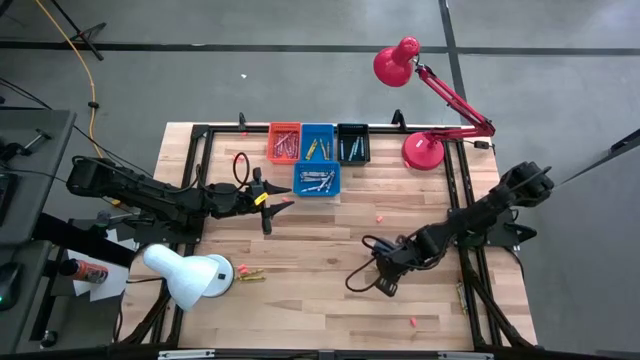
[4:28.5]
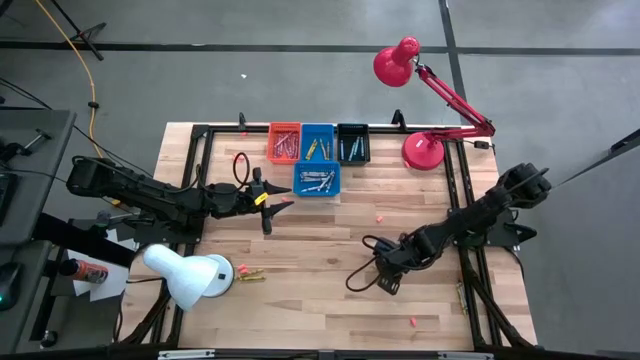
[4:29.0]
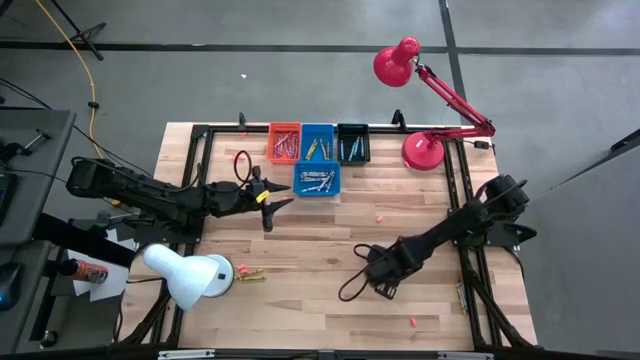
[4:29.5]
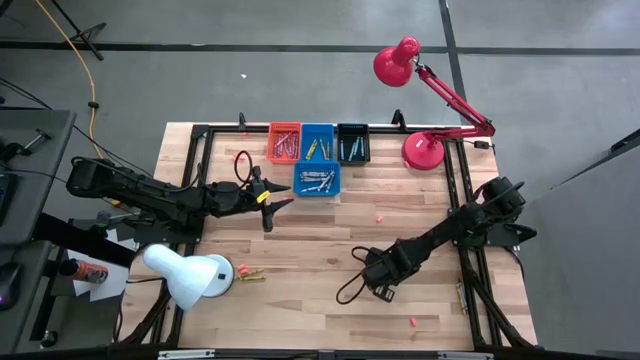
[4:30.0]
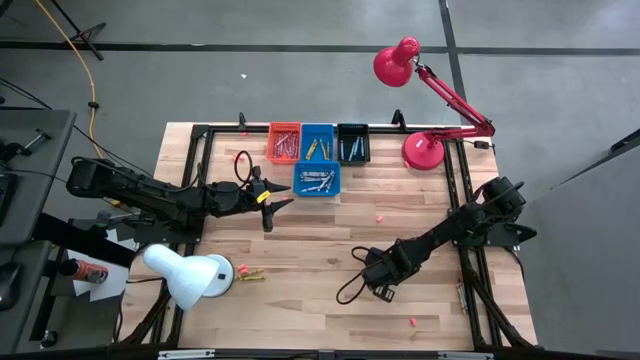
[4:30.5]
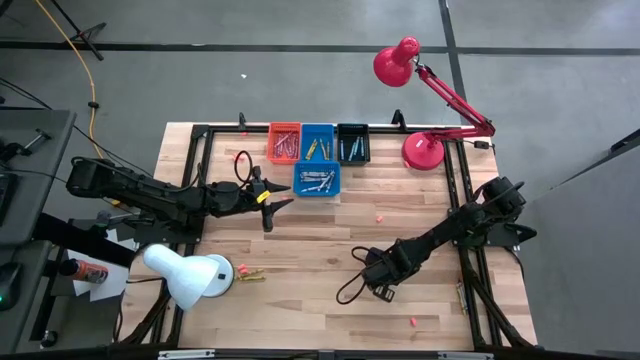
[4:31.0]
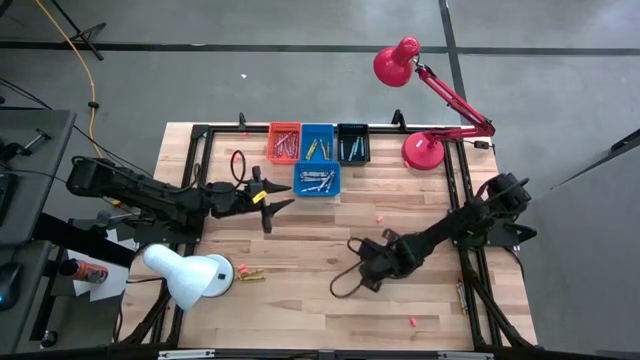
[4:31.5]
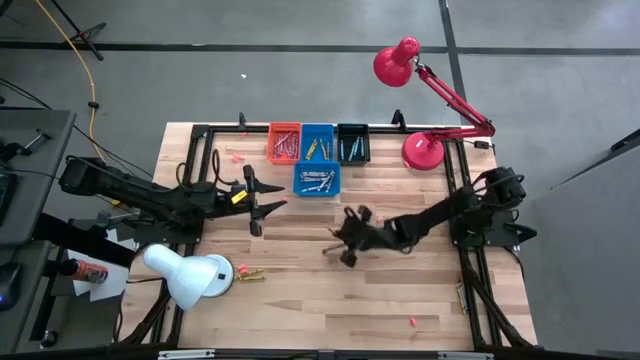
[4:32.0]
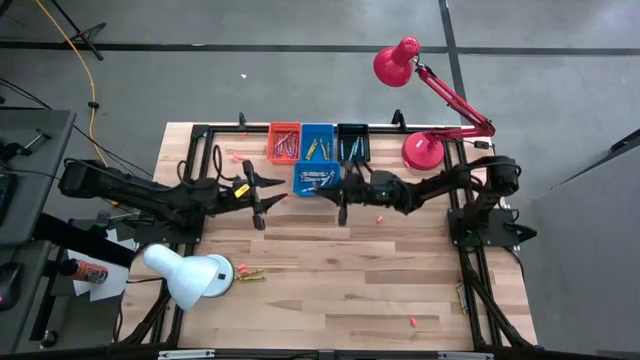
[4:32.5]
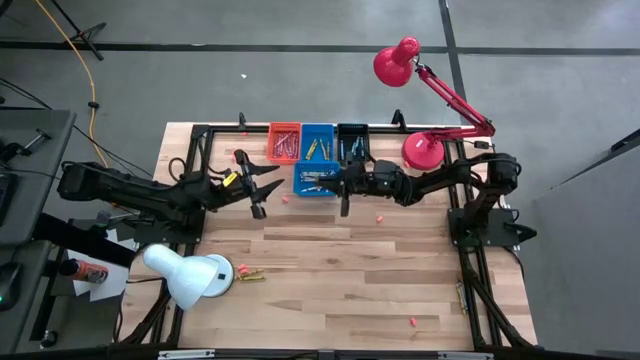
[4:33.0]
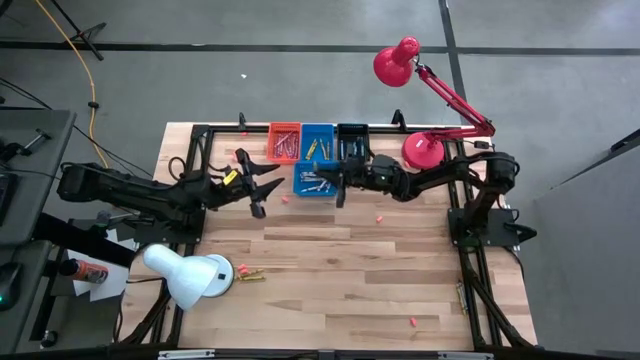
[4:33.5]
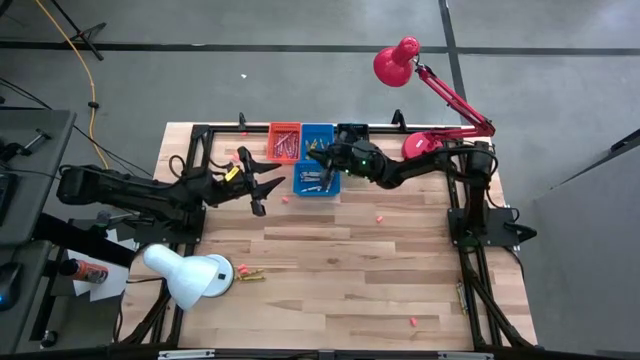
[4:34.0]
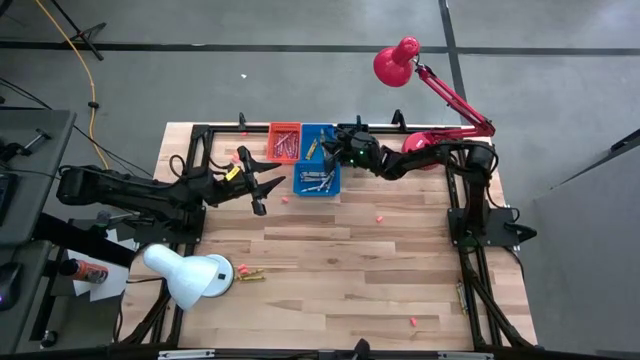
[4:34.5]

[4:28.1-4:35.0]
Task: Sort crayons
Put the yellow crayon into the top blue bin

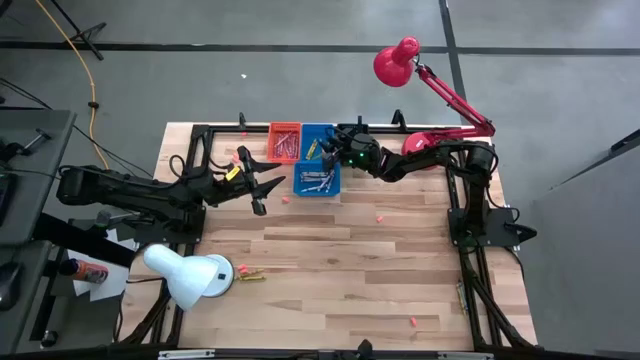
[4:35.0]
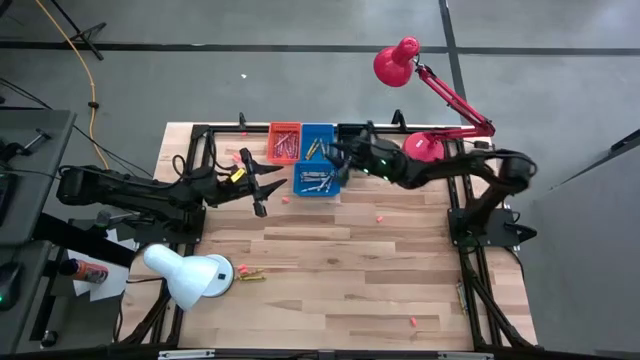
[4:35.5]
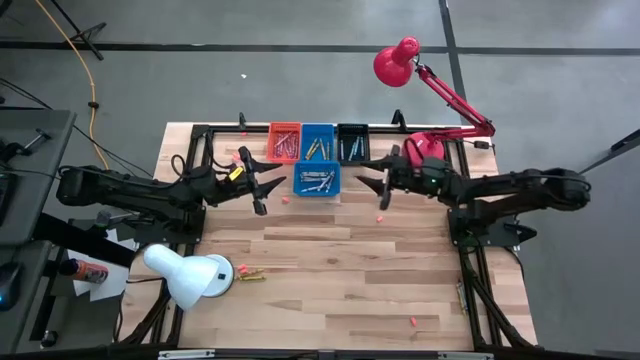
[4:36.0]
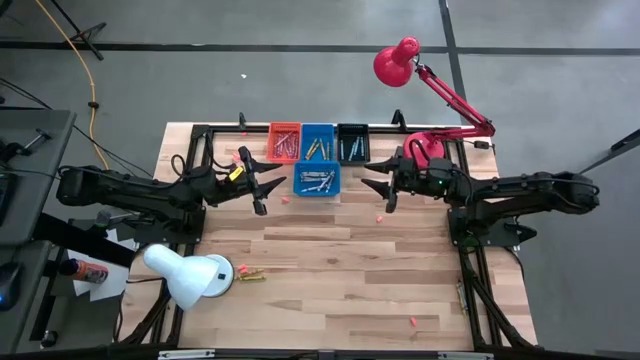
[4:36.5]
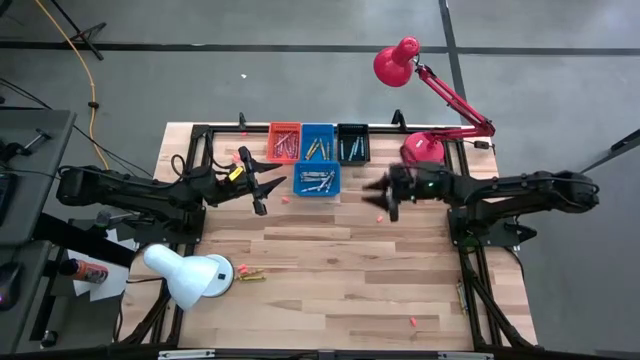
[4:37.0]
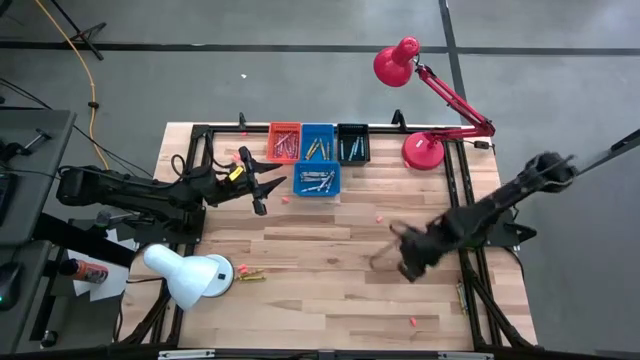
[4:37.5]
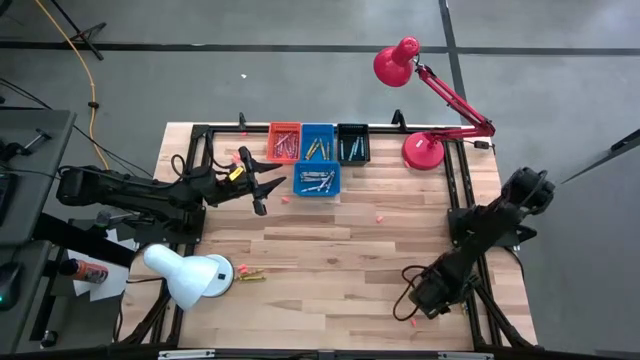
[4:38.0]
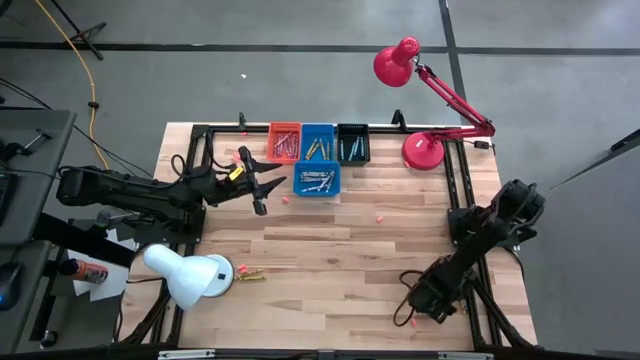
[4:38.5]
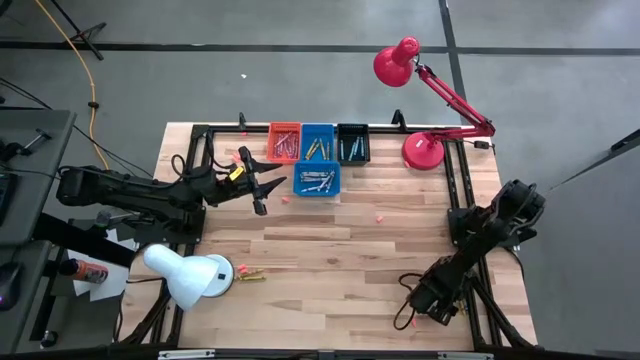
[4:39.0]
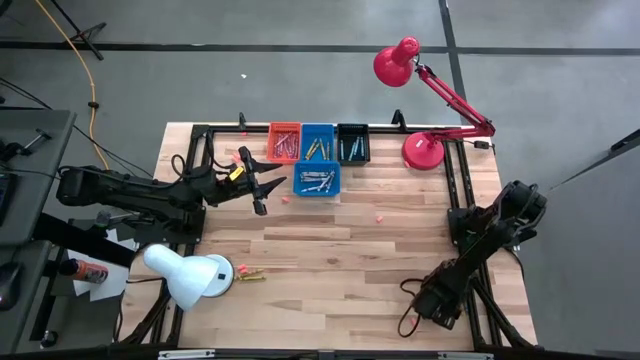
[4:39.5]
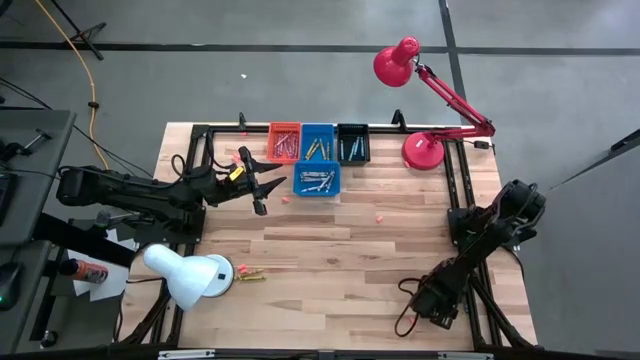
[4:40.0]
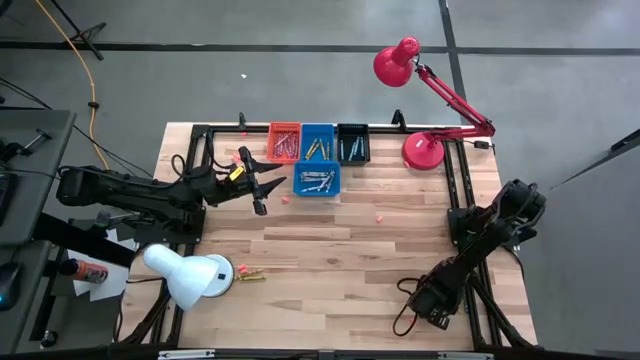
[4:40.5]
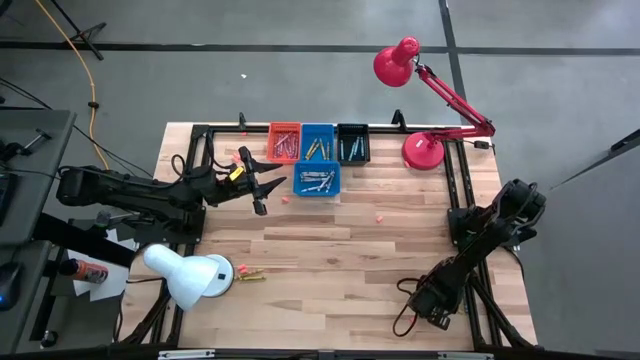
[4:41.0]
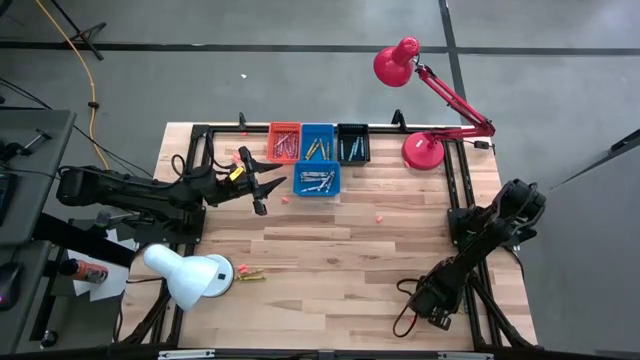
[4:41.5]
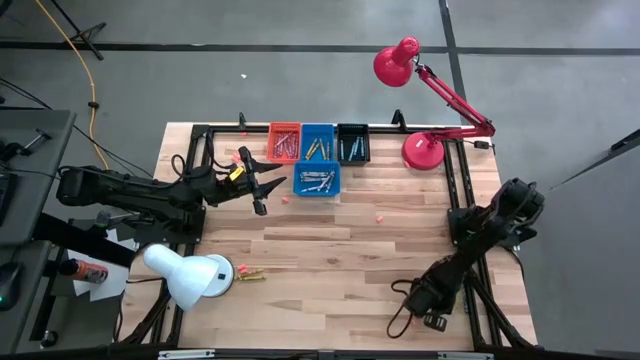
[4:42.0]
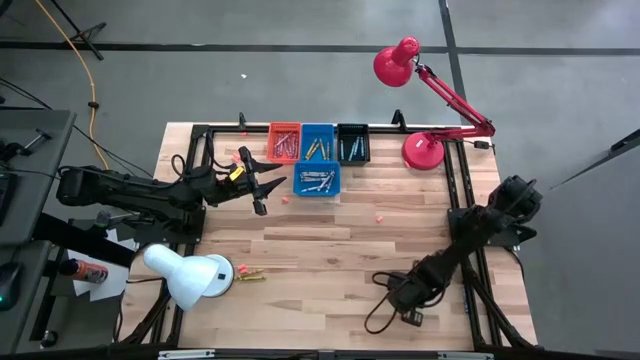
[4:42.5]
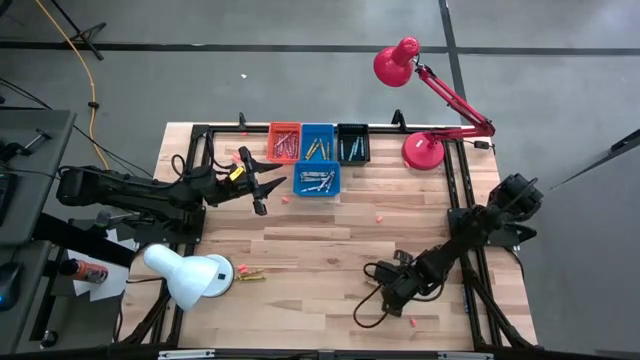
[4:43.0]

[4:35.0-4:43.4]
Put the yellow crayon into the top blue bin

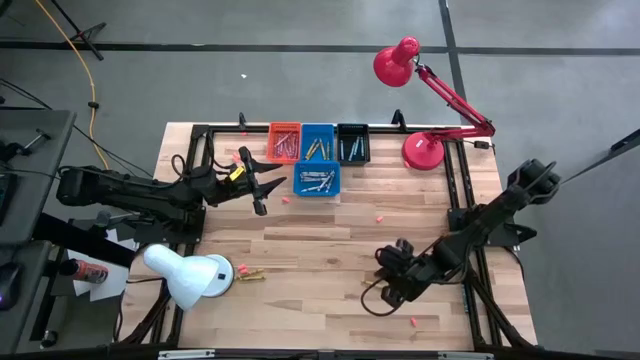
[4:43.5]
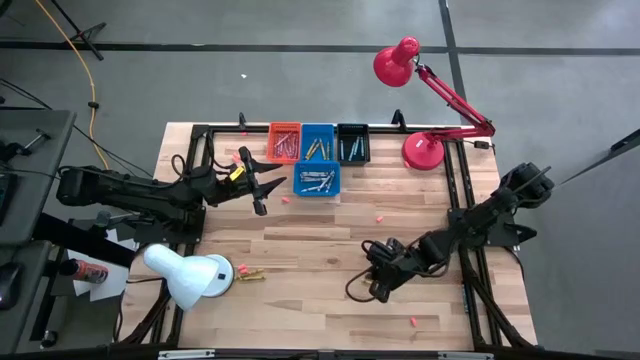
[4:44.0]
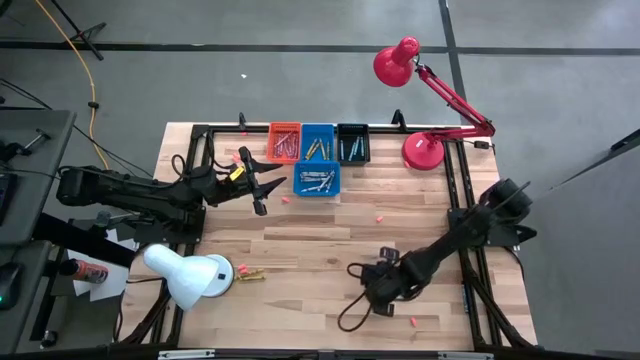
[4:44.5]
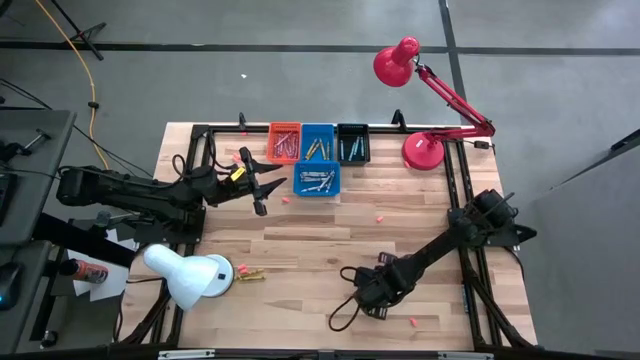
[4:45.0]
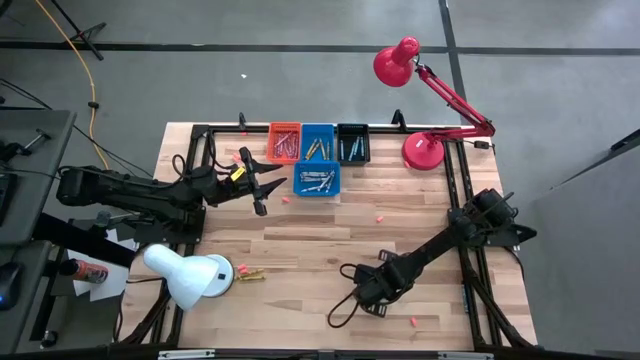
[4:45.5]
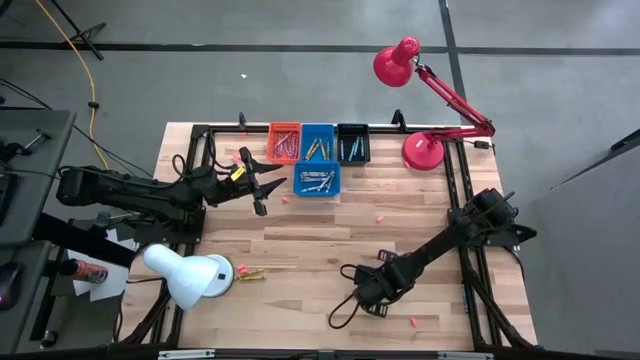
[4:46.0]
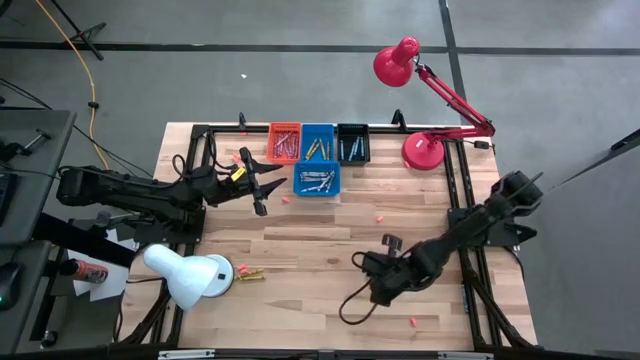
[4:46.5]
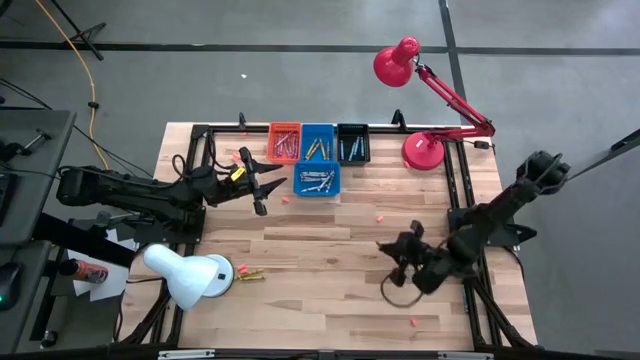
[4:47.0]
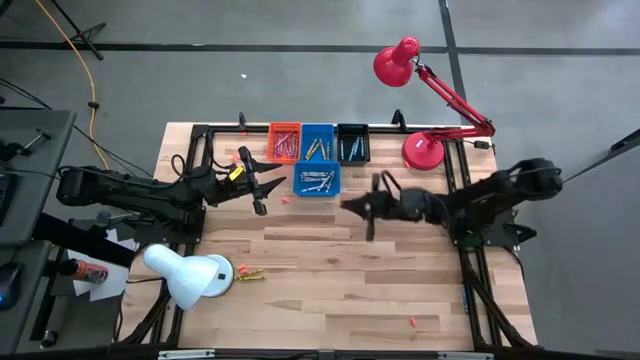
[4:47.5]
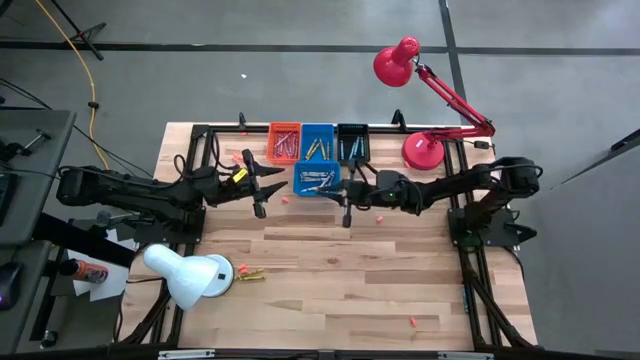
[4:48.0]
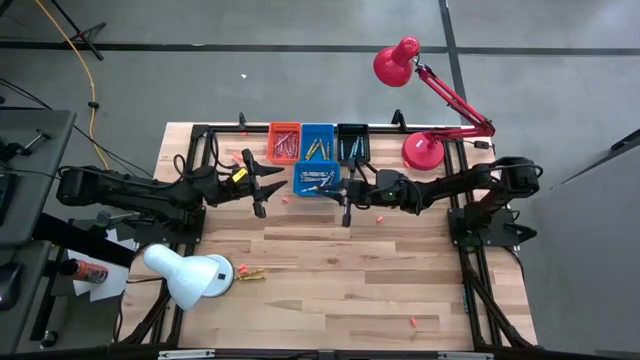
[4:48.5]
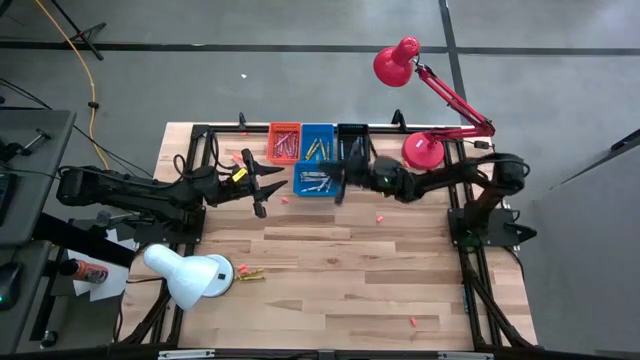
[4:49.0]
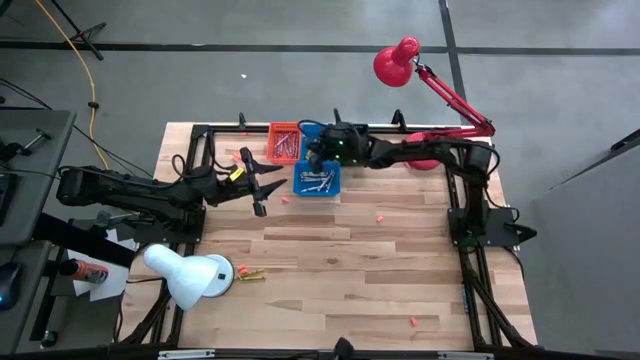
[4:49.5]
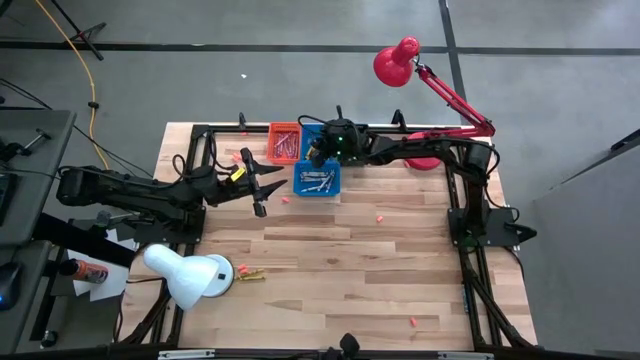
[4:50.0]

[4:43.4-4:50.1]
Put the yellow crayon into the top blue bin
